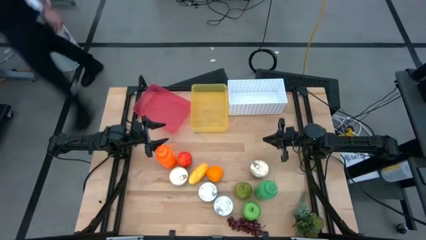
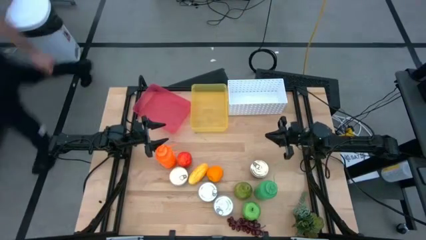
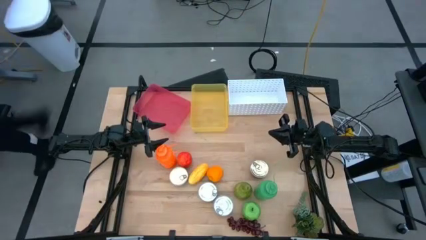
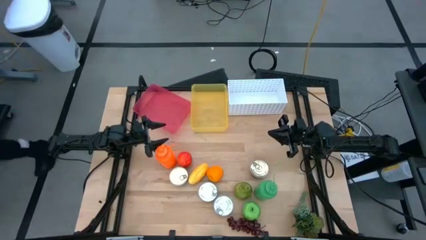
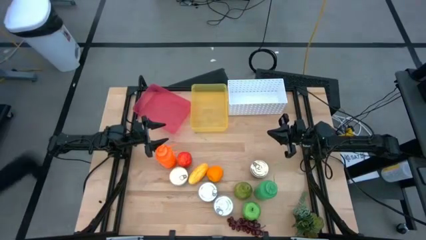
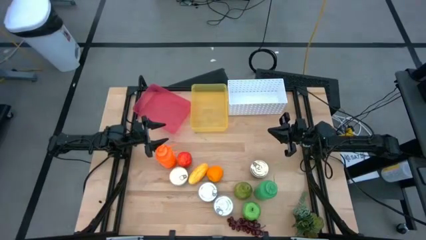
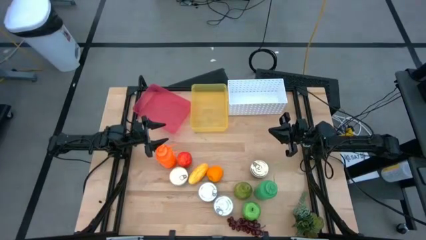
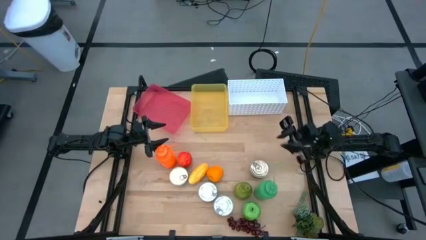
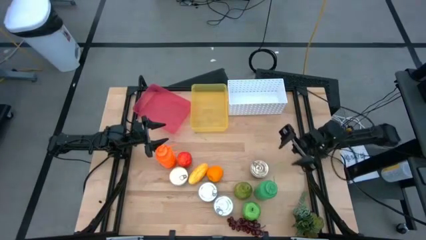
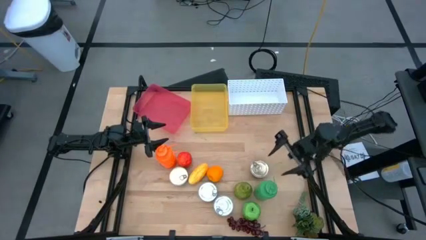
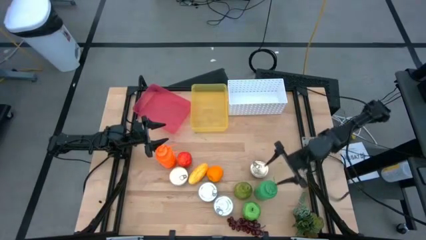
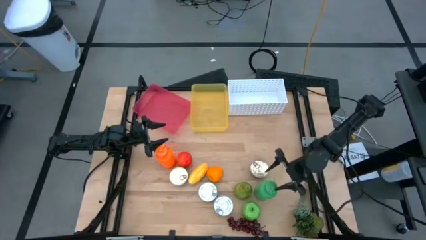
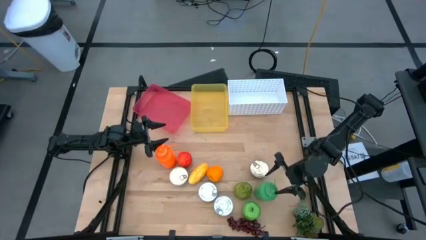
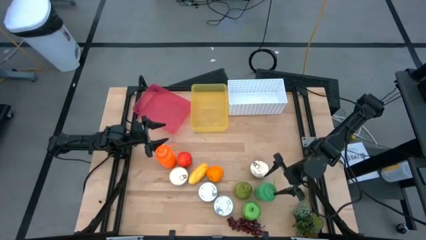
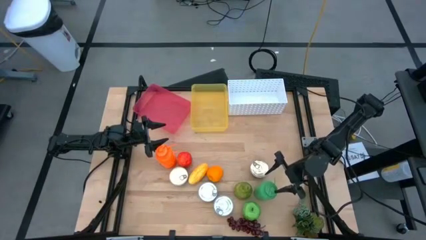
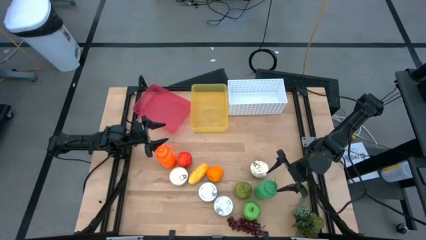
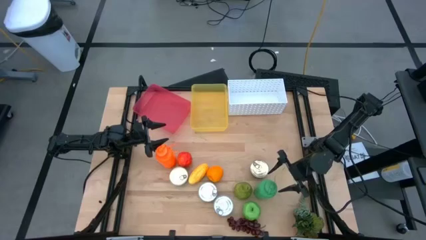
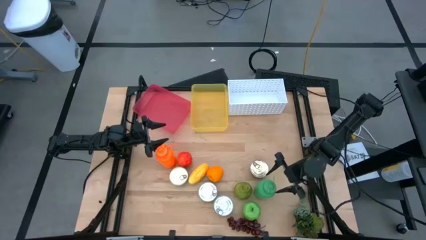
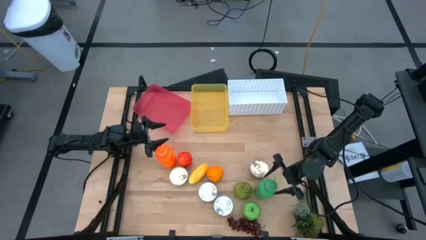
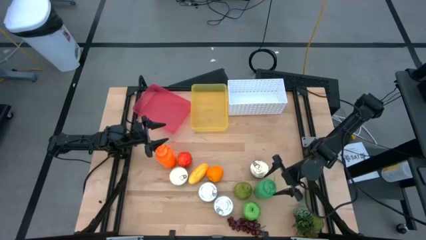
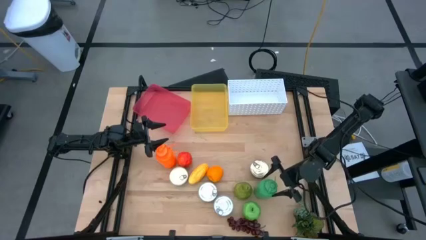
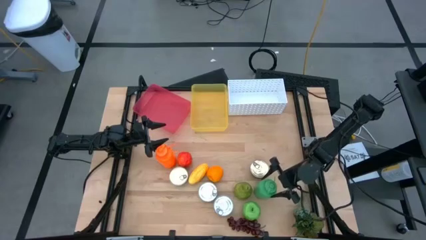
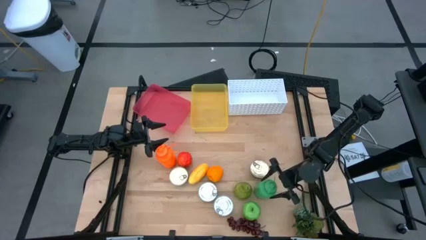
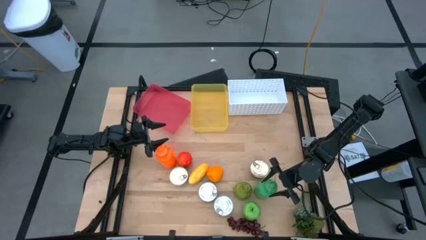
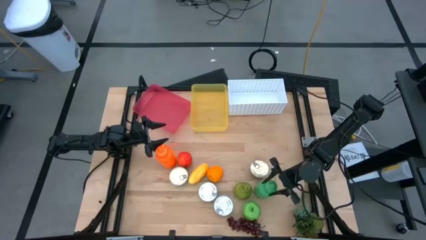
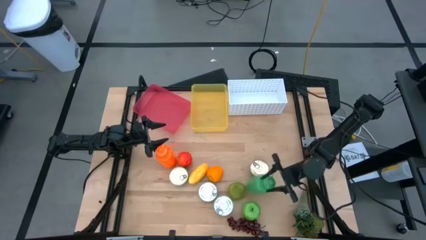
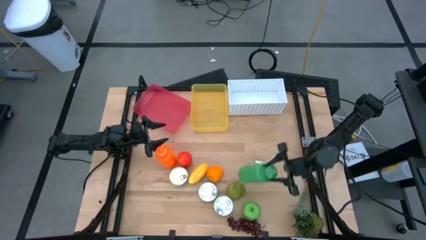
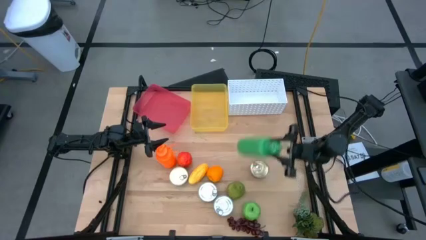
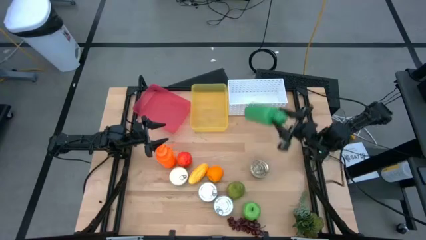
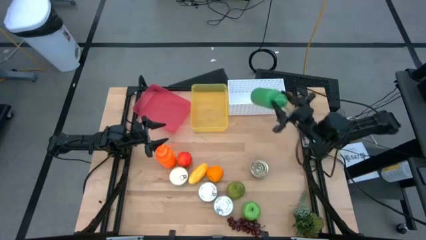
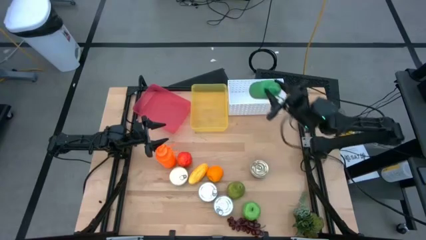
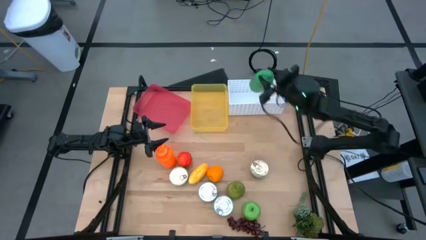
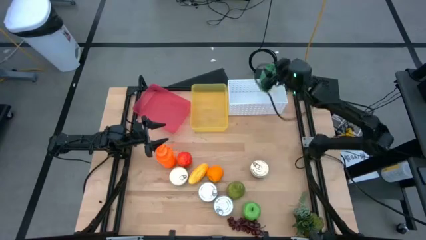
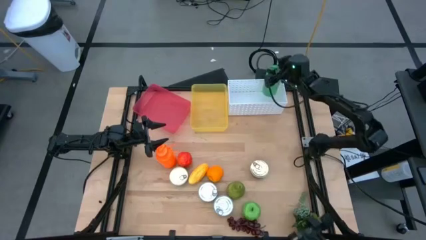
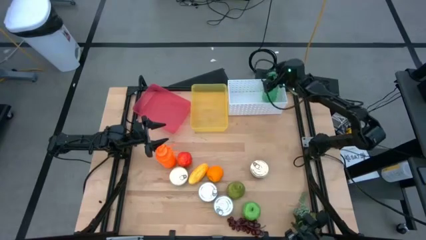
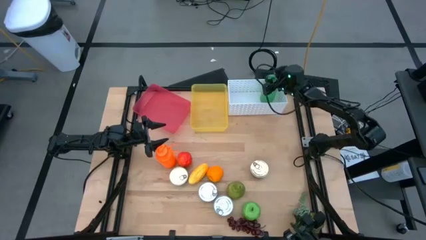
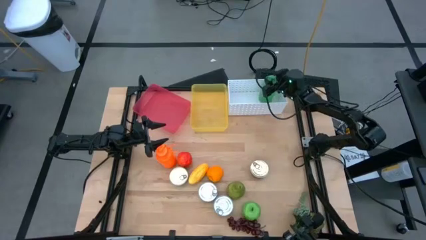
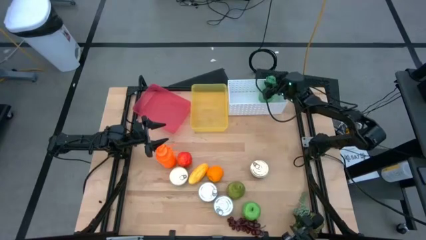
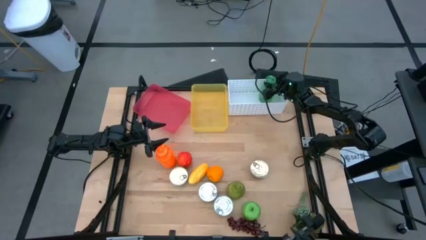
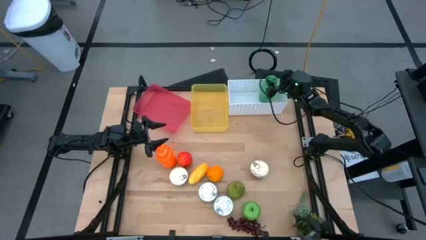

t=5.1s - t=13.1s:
Task: Pick & Place Food Item
Put the green water bottle into the white bin

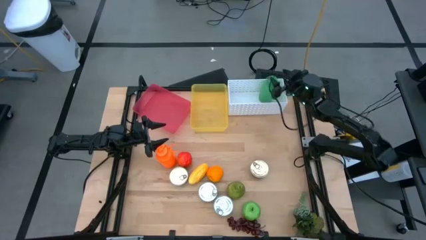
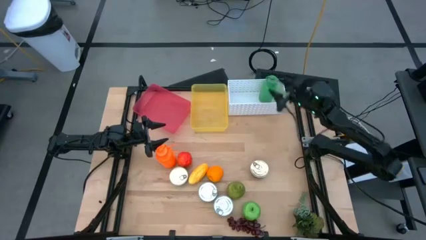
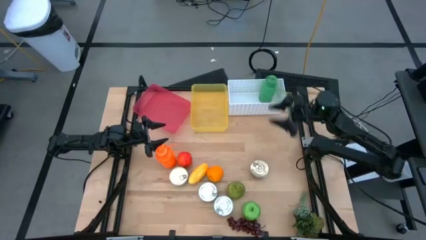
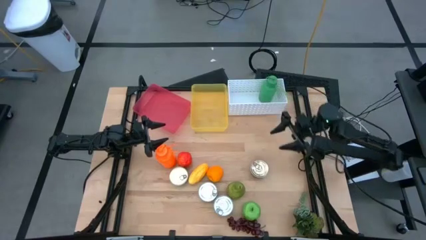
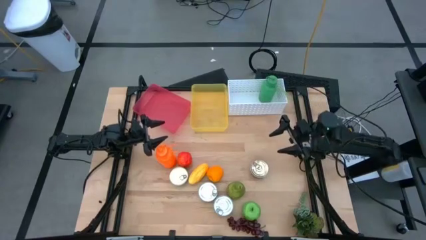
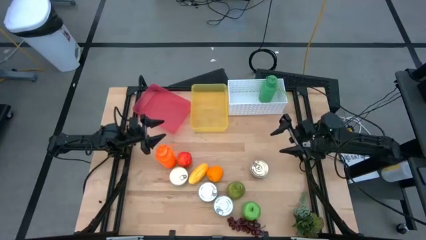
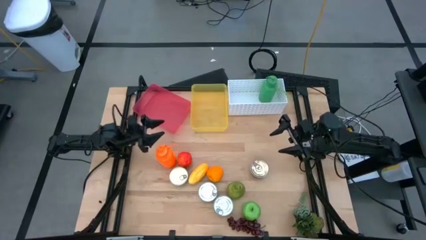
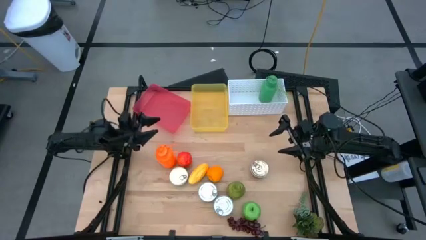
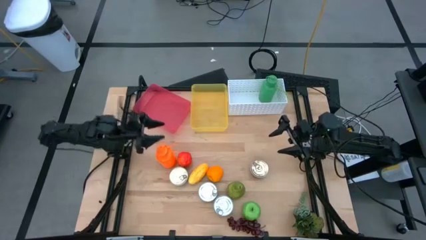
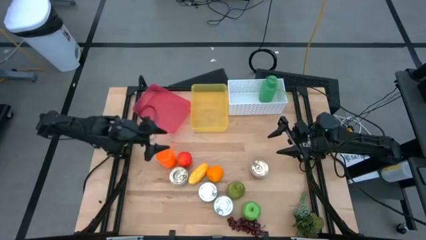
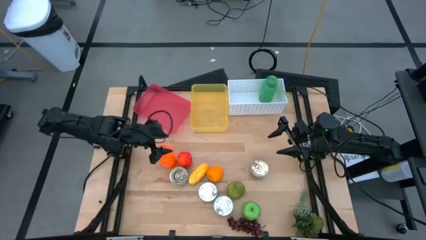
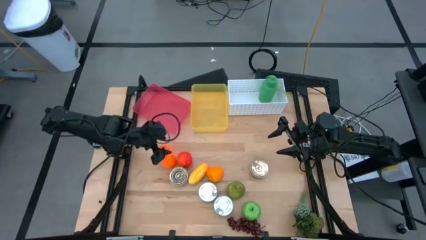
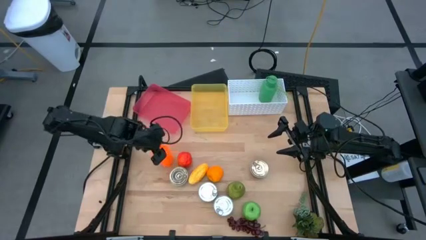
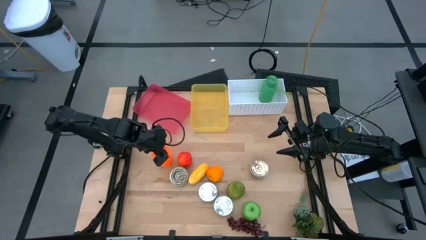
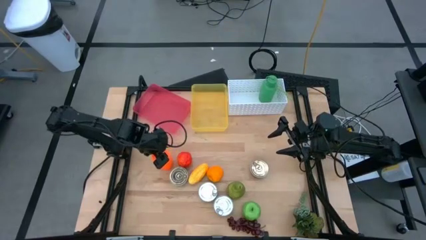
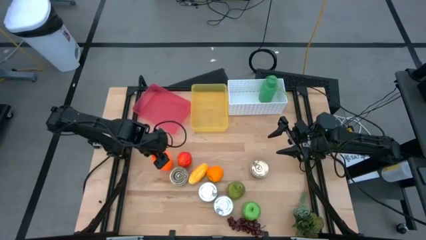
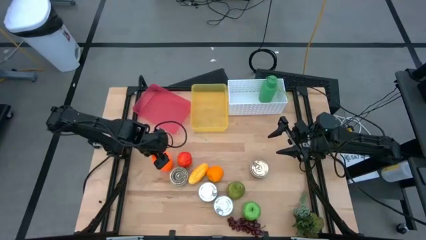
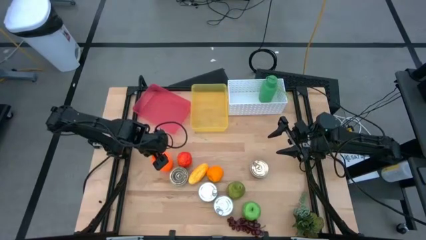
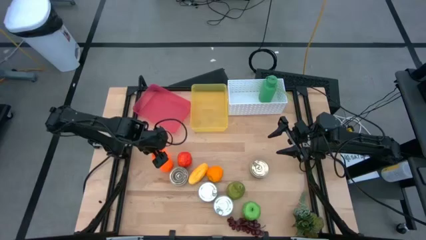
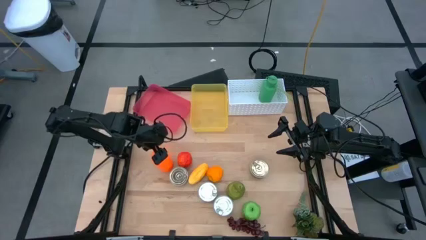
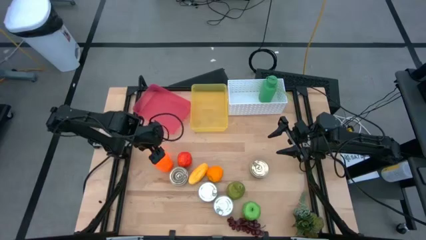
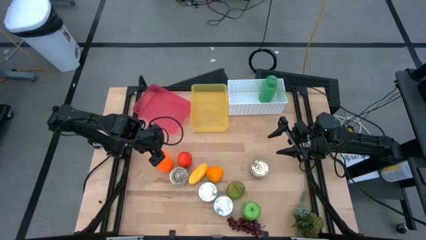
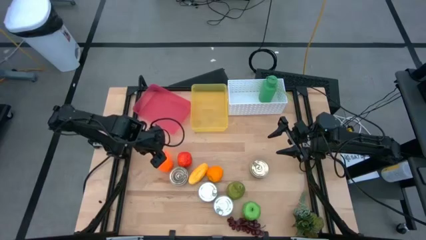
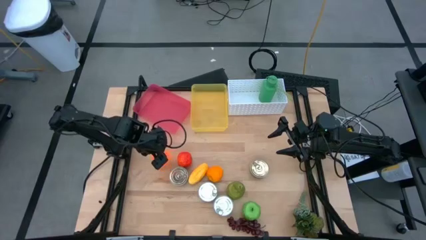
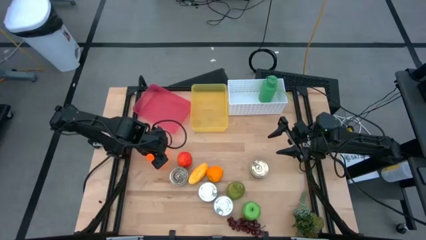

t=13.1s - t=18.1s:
Put the orange water bottle into the white bin

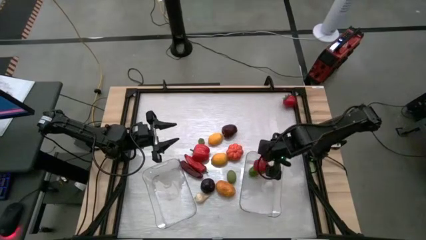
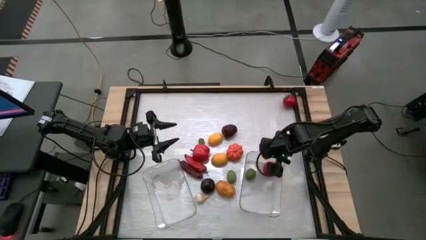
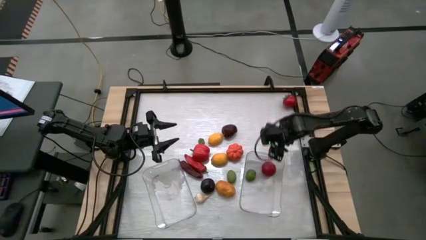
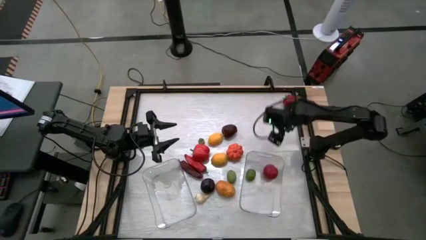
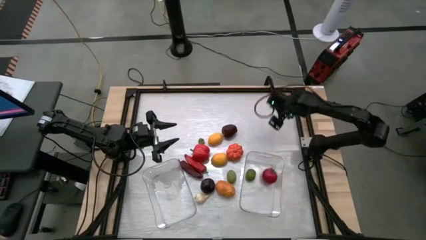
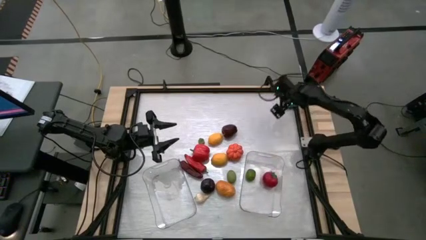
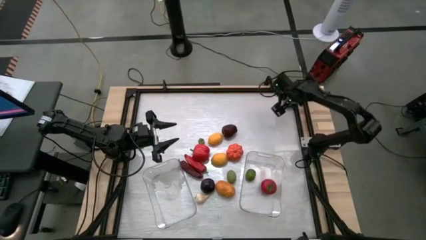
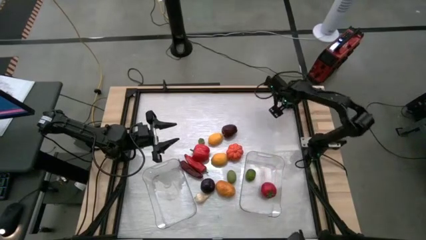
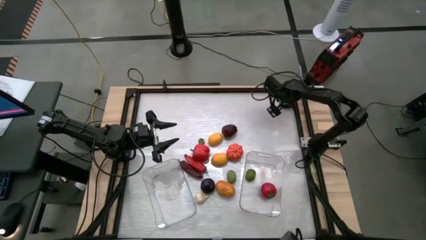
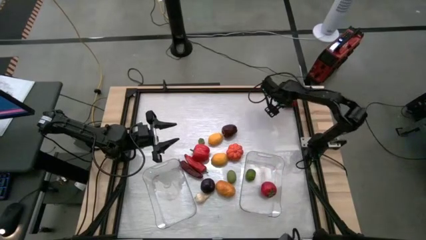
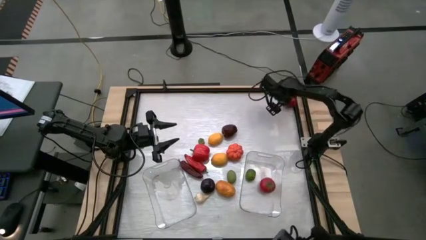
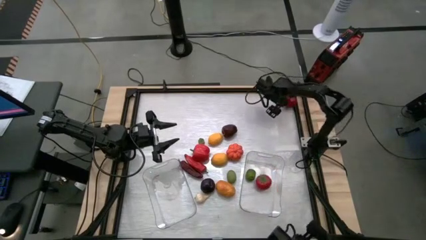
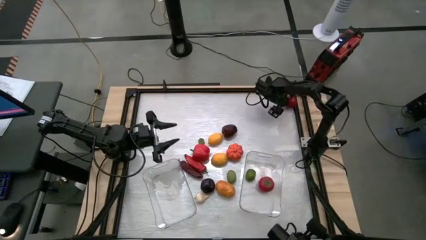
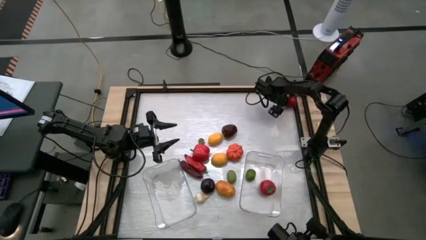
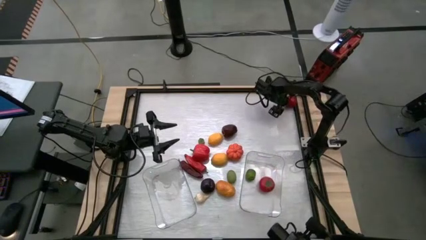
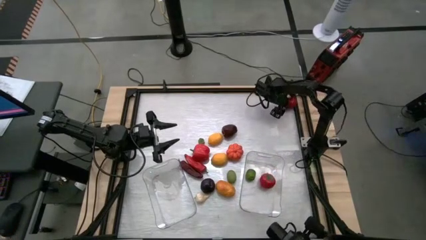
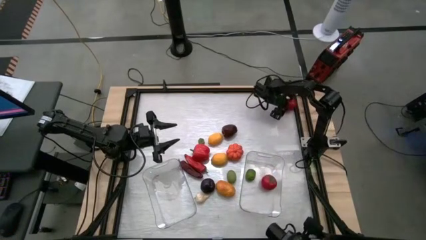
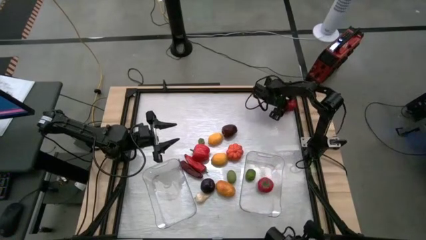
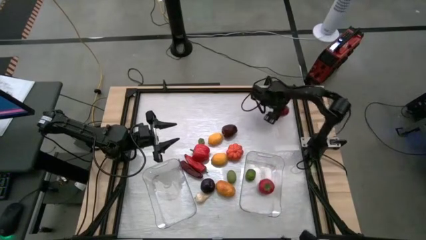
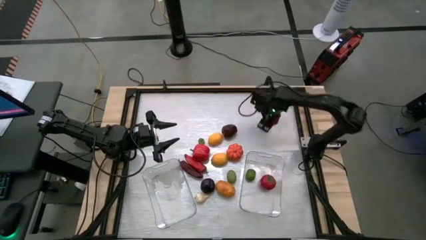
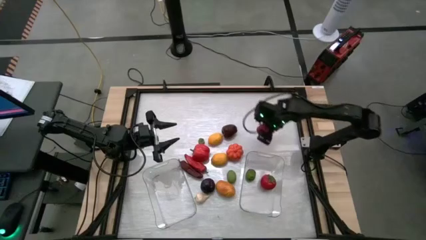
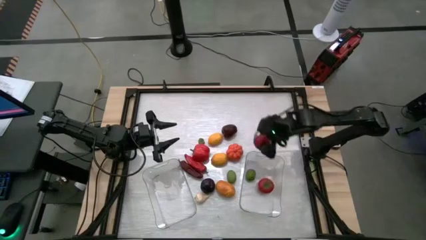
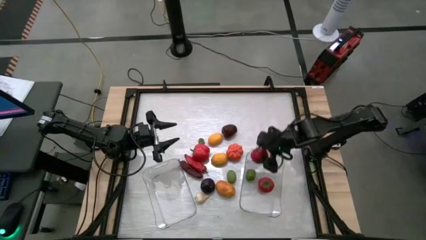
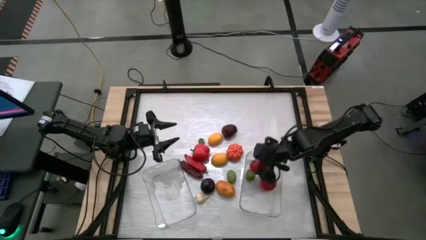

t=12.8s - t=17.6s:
Task: Sort produce into baskets
Put the tomato into the right transparent bin
